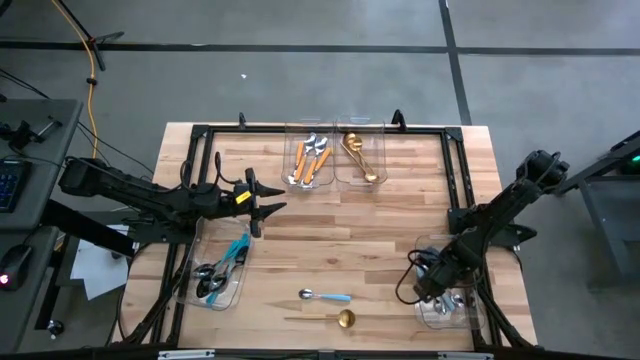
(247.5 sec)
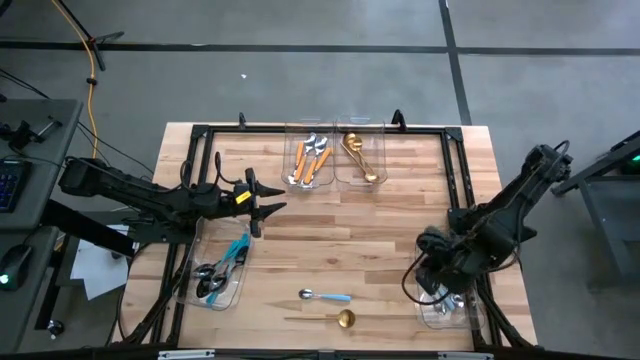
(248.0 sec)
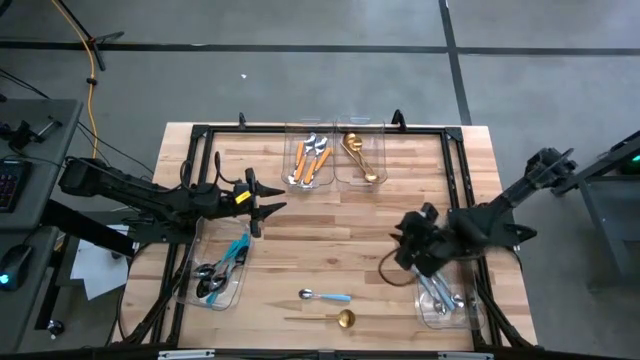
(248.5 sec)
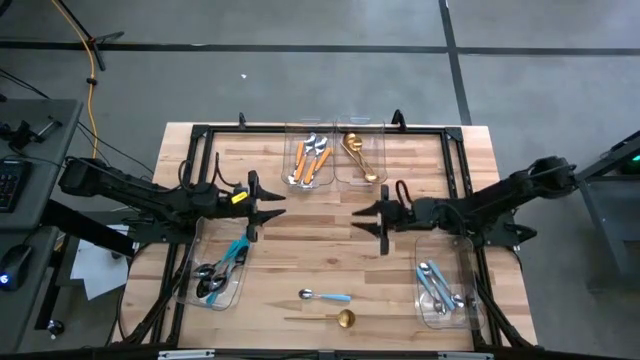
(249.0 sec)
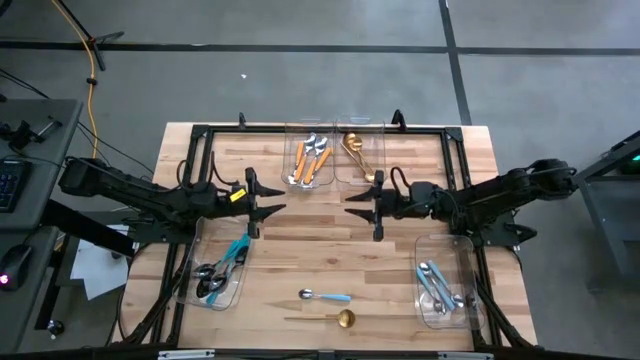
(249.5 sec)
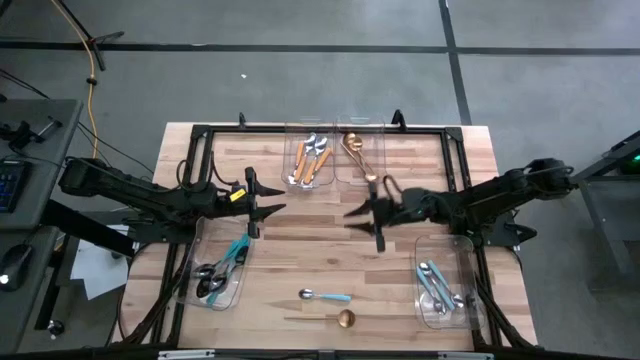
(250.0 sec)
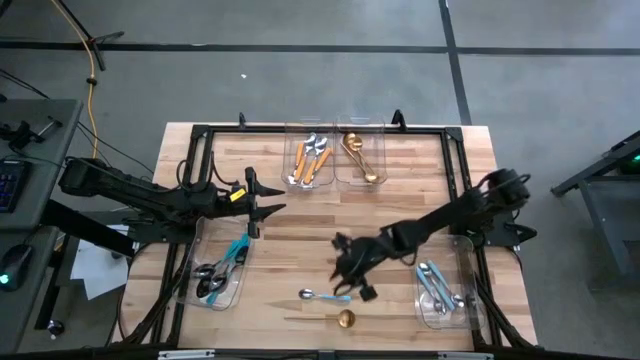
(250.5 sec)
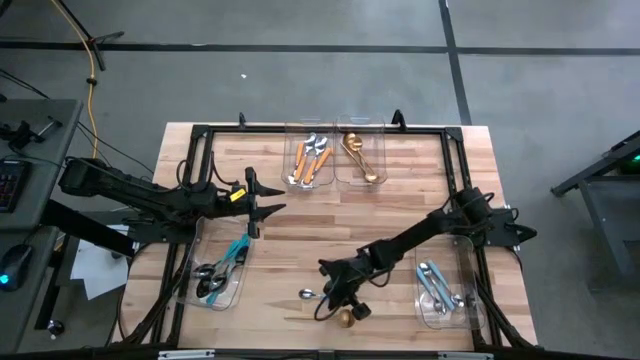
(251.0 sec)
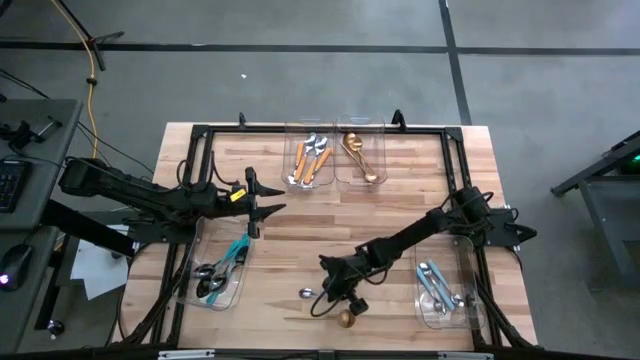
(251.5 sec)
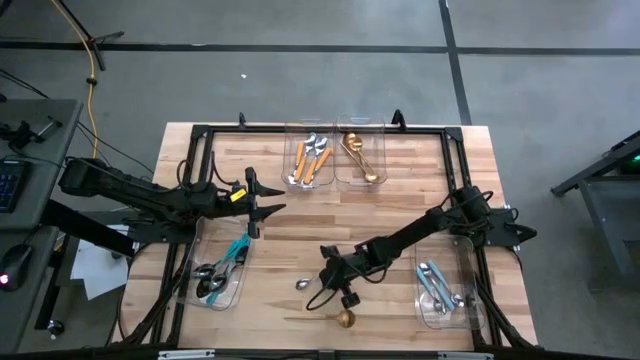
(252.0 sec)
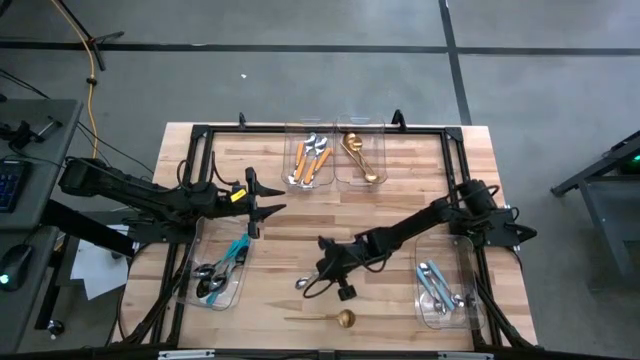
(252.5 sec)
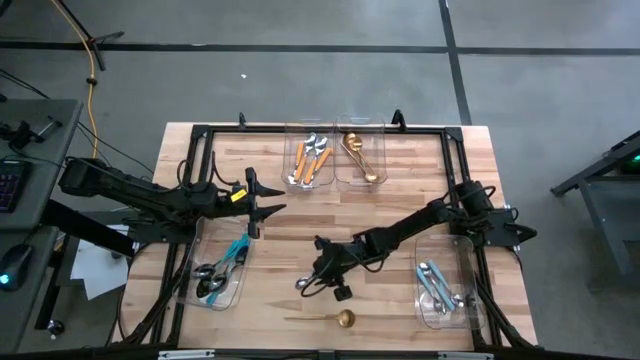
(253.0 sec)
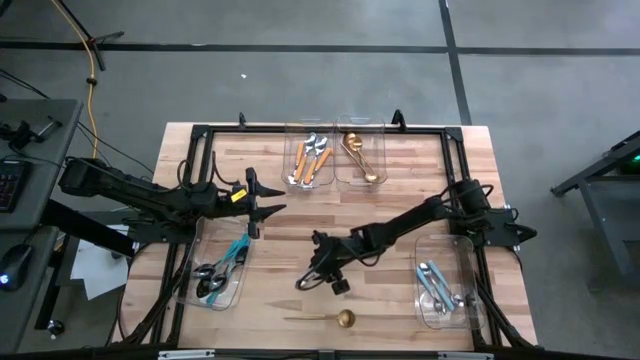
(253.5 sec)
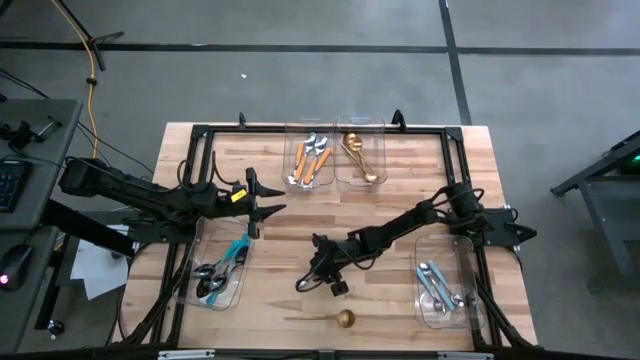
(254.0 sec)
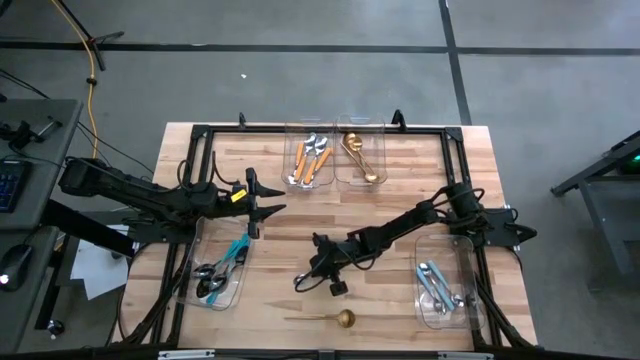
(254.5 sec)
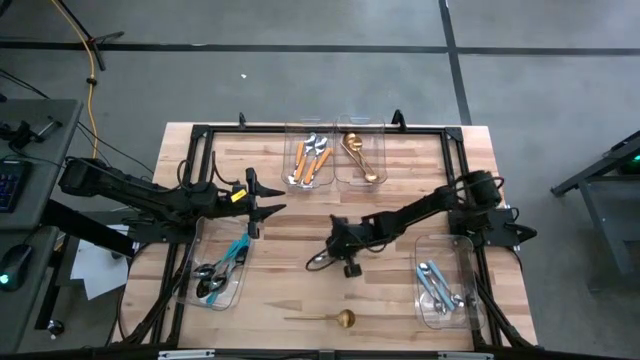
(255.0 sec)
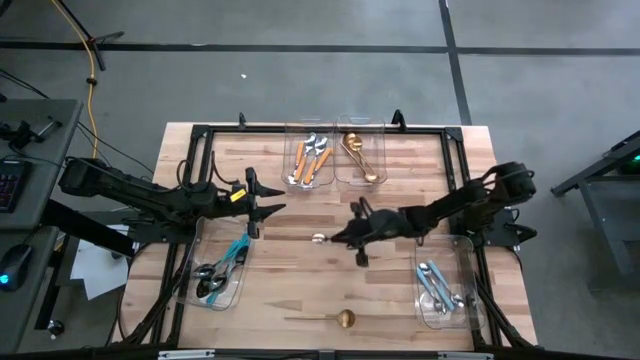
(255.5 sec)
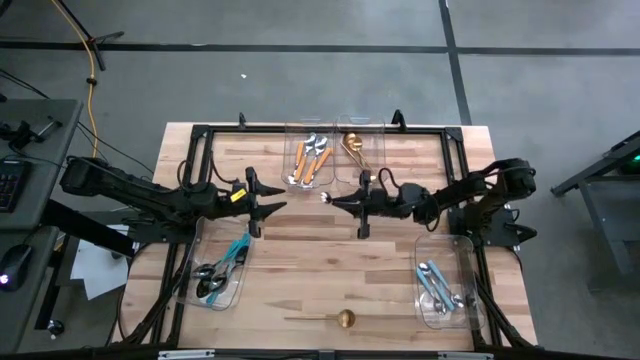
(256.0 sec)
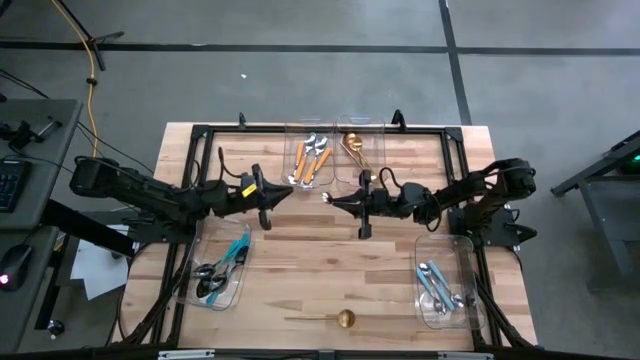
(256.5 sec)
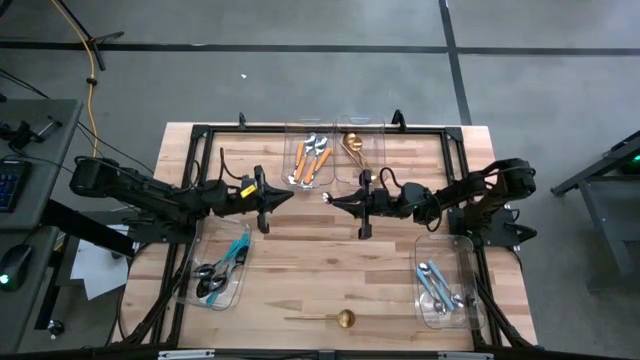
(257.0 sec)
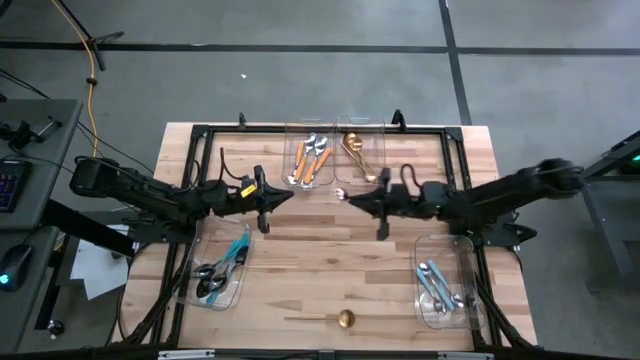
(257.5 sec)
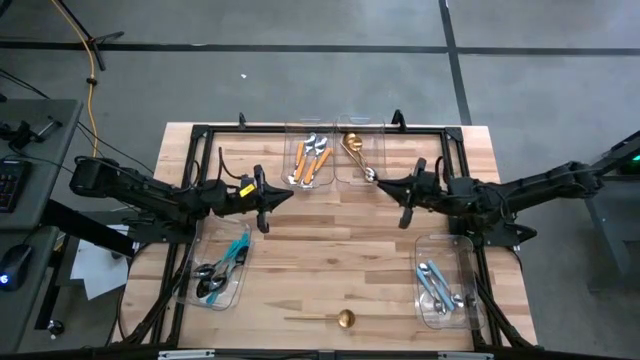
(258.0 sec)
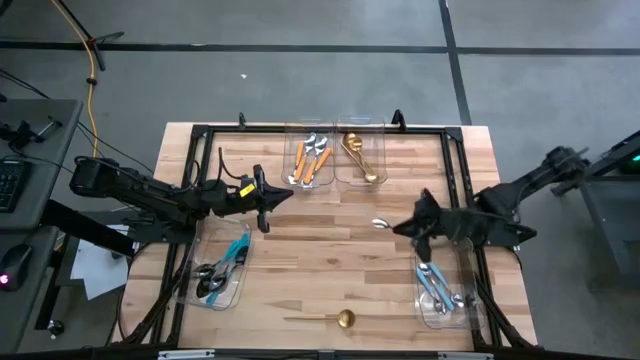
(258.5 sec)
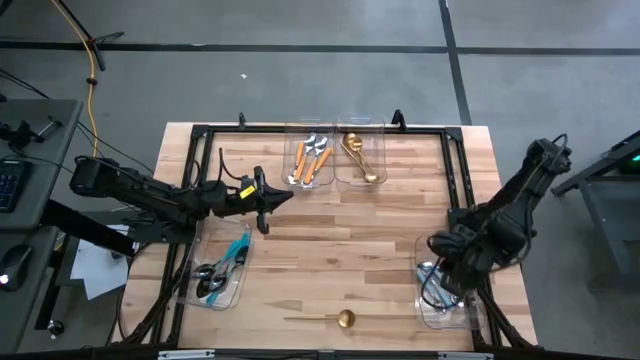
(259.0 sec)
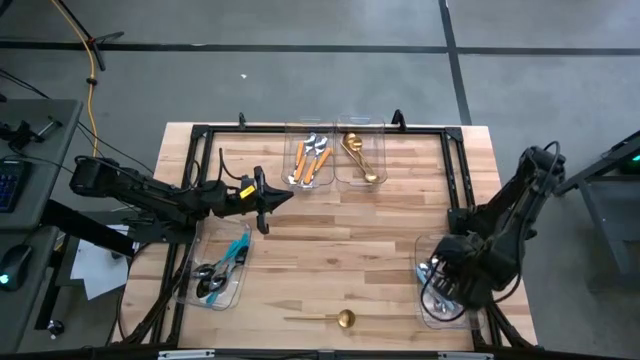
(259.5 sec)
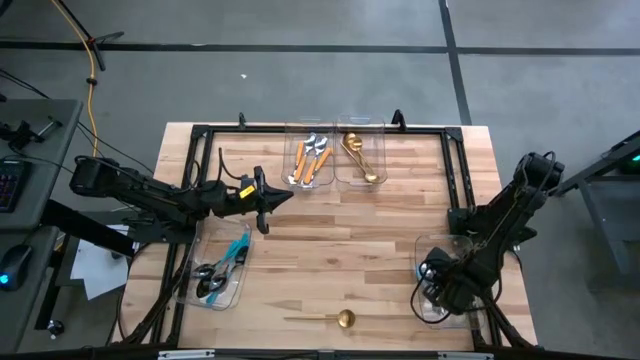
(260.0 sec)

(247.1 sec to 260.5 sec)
Task: Sort silverware by color (type)
Put the blue spoon into the bottom right transparent bin
